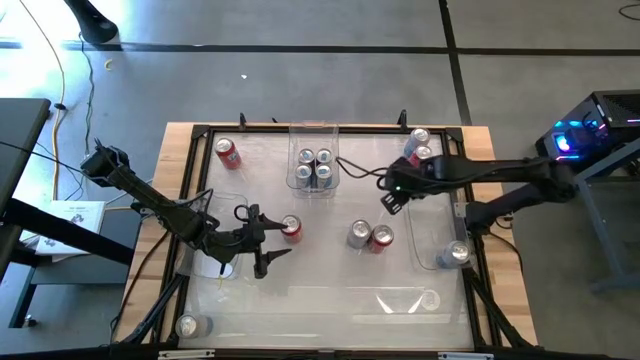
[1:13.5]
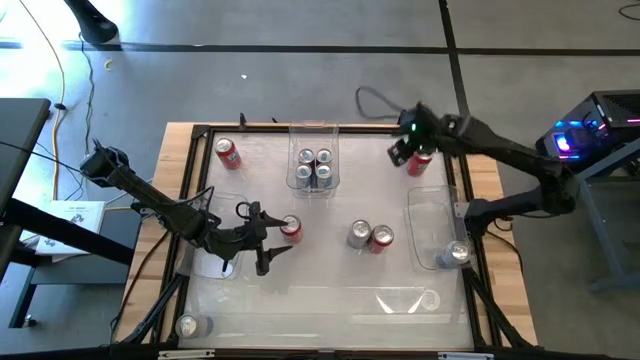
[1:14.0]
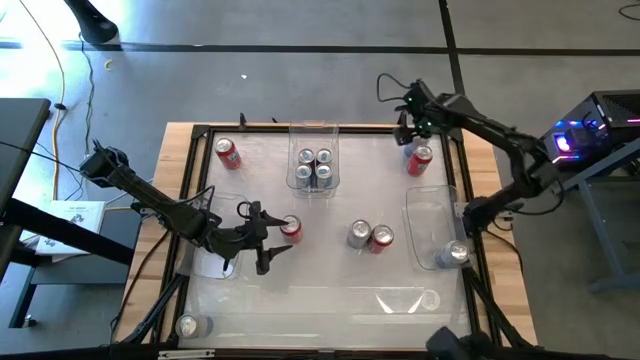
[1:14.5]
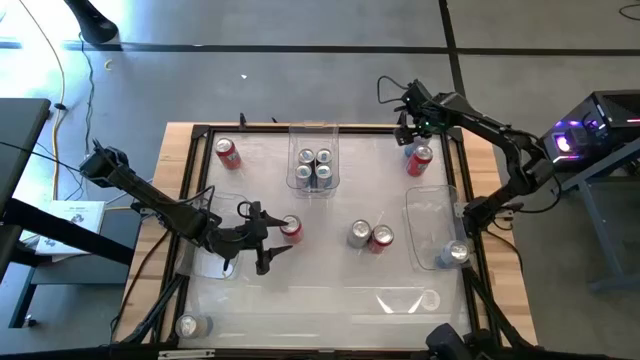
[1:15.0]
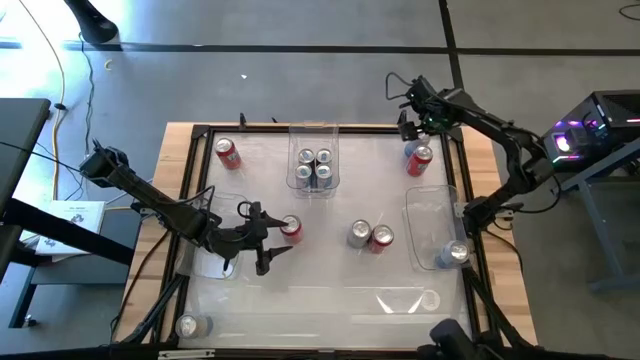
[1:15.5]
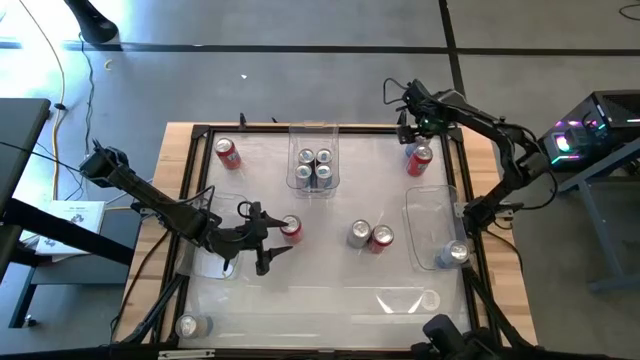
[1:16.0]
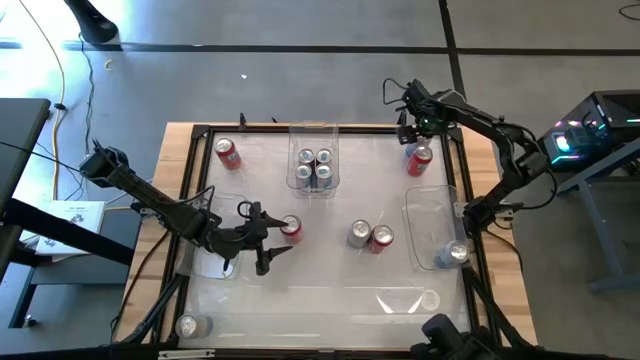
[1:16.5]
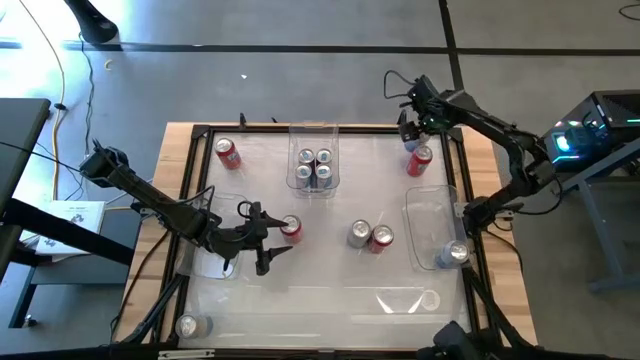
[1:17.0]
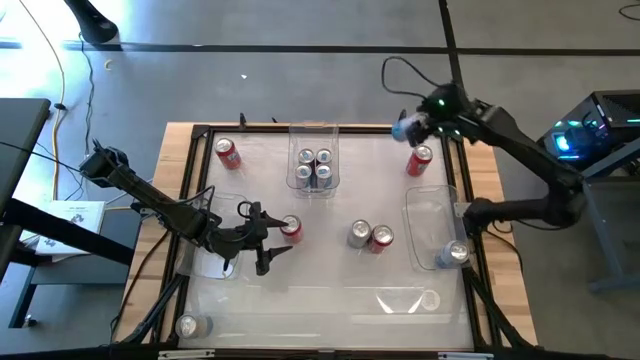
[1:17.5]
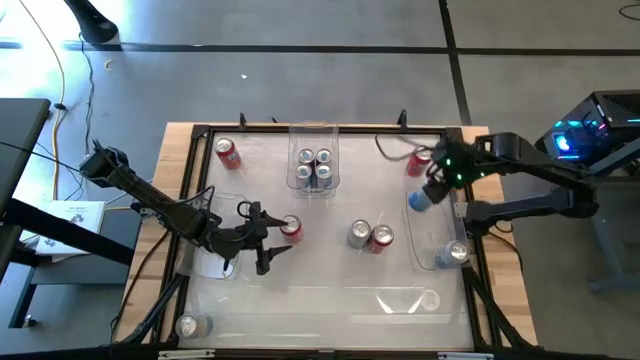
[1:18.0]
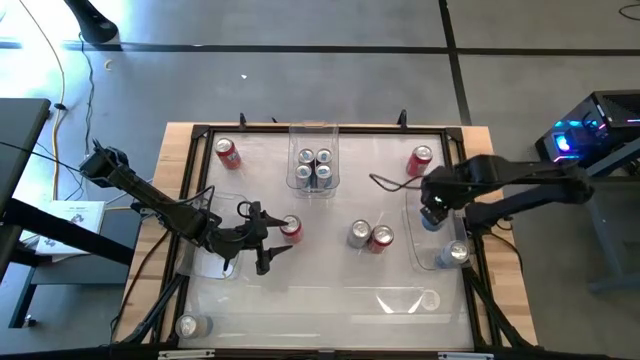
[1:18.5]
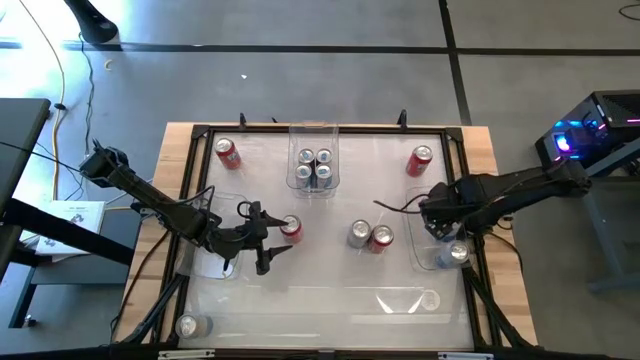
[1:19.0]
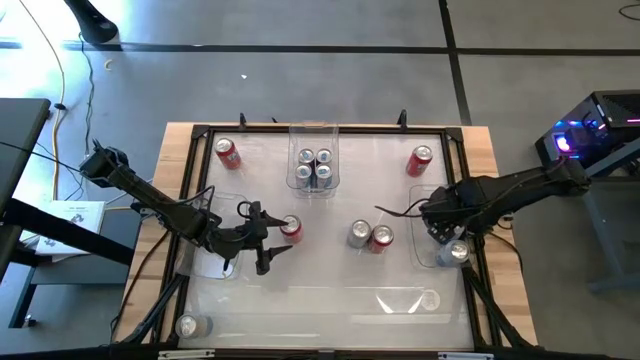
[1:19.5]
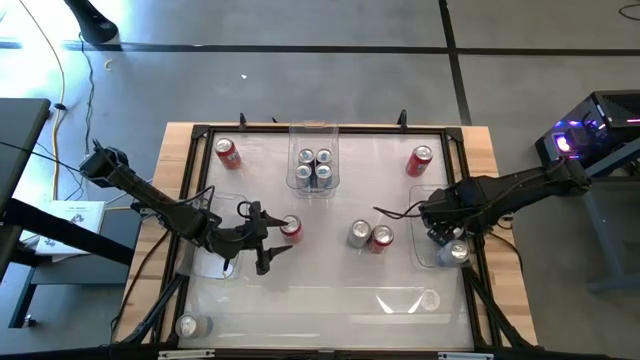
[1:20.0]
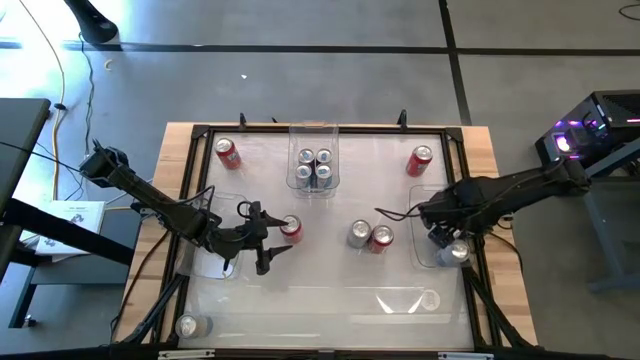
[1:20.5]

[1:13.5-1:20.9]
Task: Sort soda cans
Put the top right blue-white soda can into the bottom right transparent bin

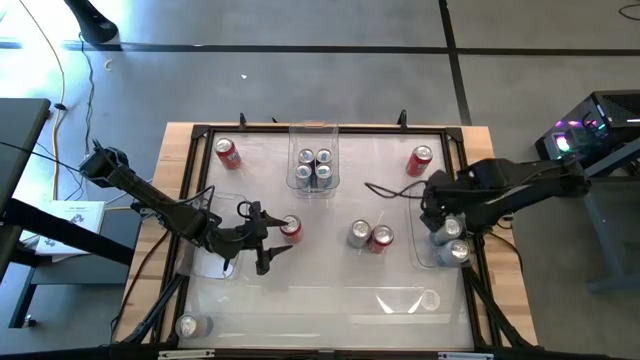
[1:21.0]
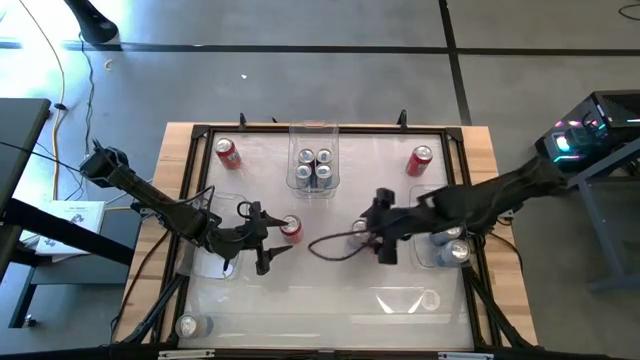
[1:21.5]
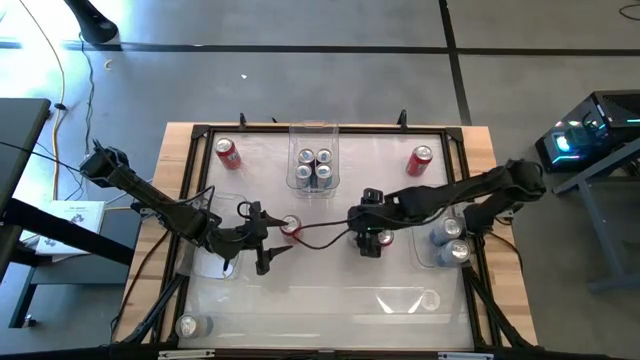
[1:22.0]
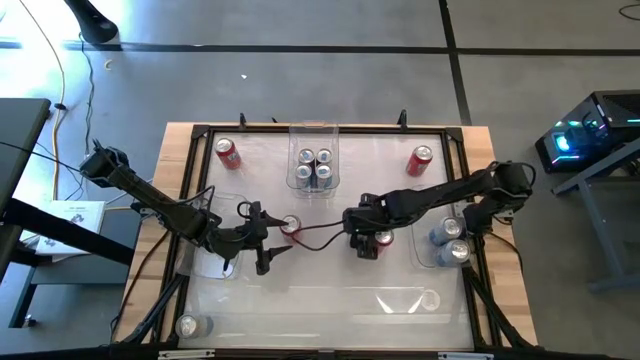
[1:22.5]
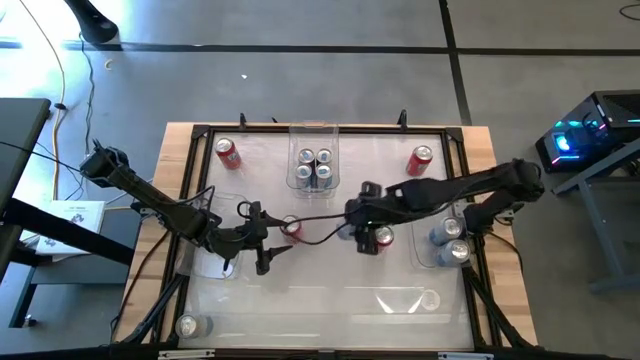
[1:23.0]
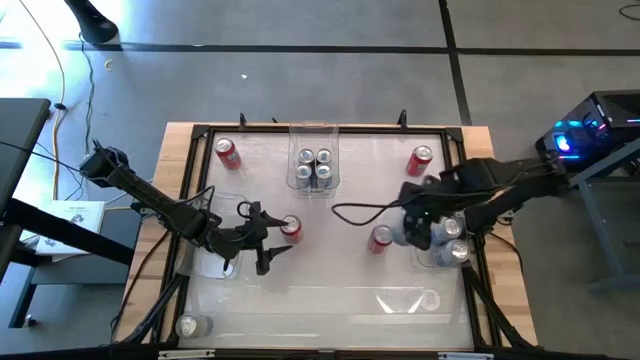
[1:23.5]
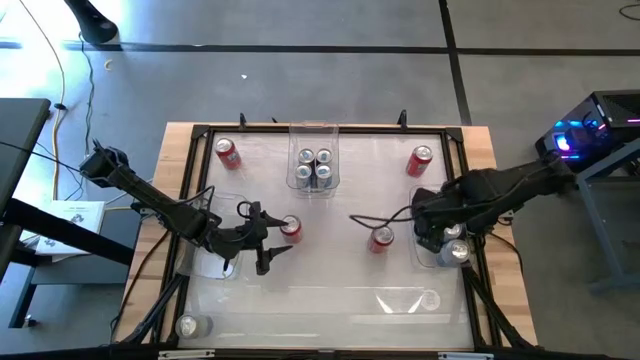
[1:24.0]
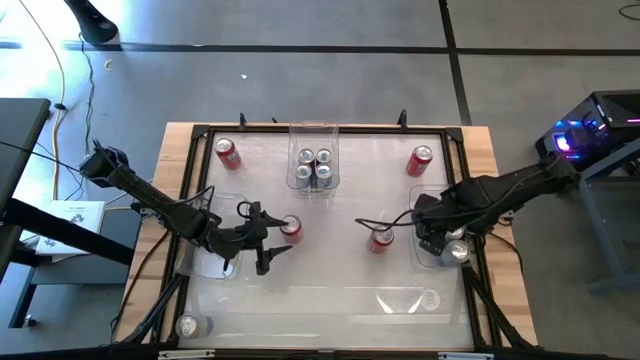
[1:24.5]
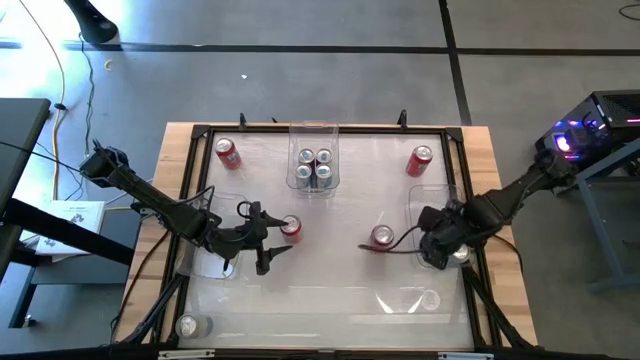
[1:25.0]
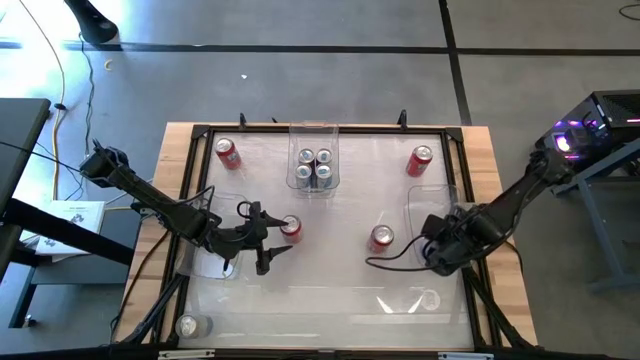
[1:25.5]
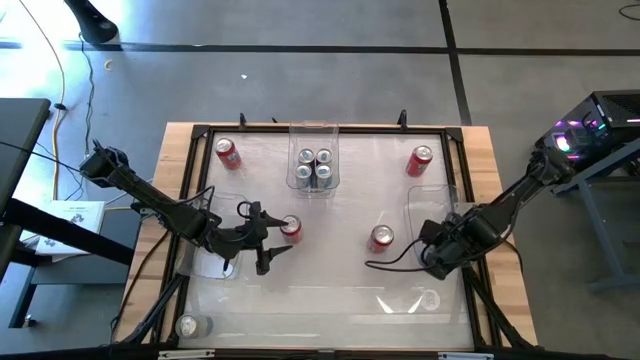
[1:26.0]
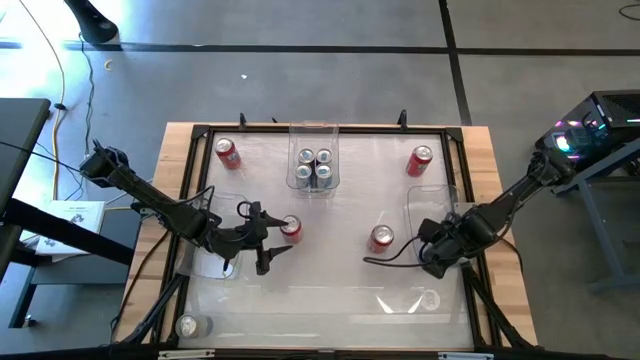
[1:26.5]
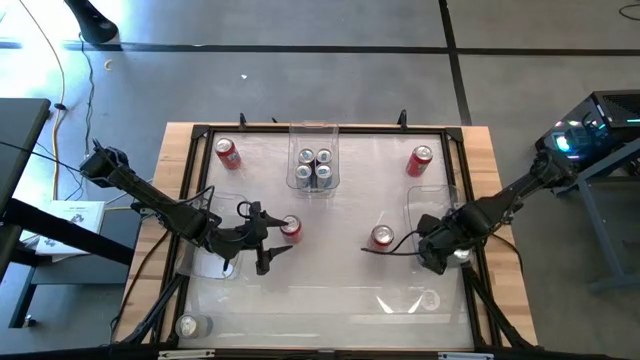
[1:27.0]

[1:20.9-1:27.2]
Put the right blue-white soda can into the bottom right transparent bin

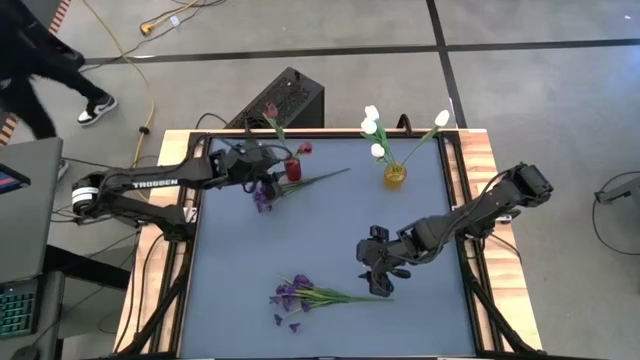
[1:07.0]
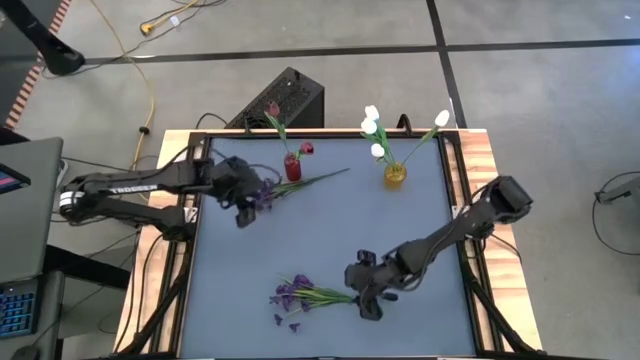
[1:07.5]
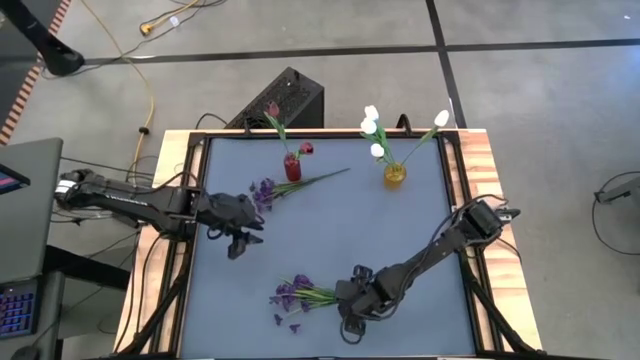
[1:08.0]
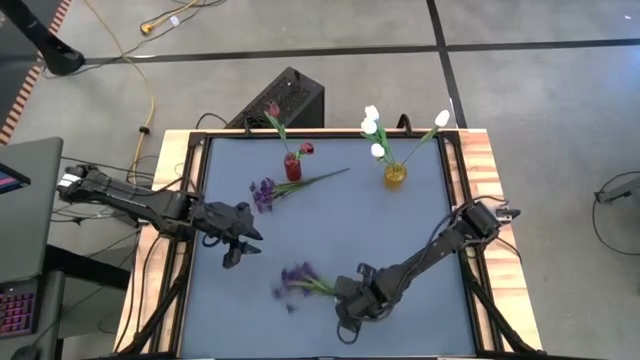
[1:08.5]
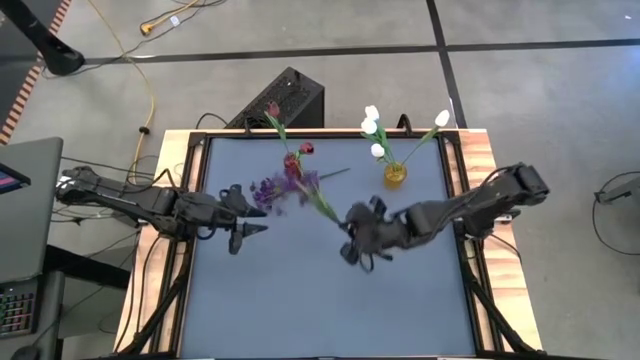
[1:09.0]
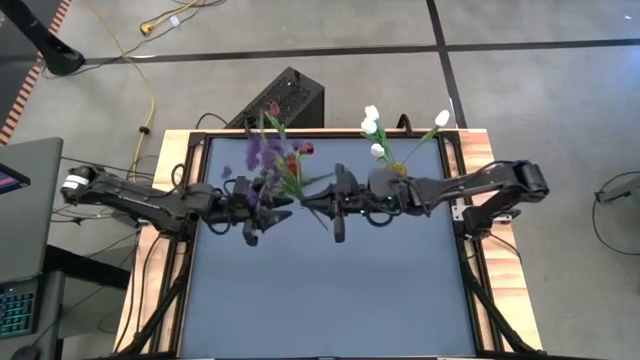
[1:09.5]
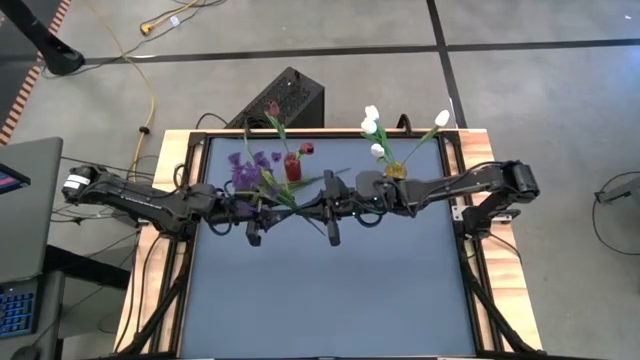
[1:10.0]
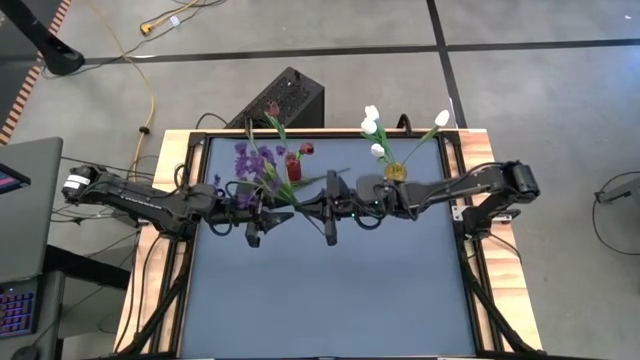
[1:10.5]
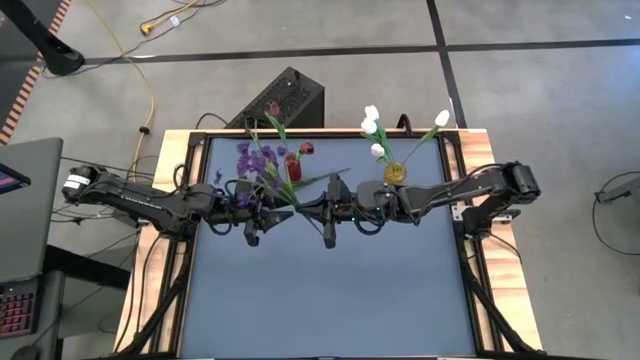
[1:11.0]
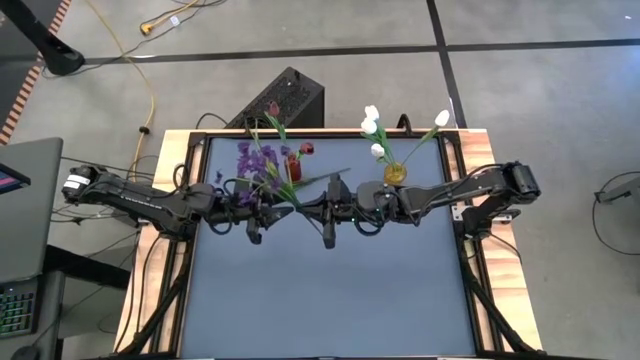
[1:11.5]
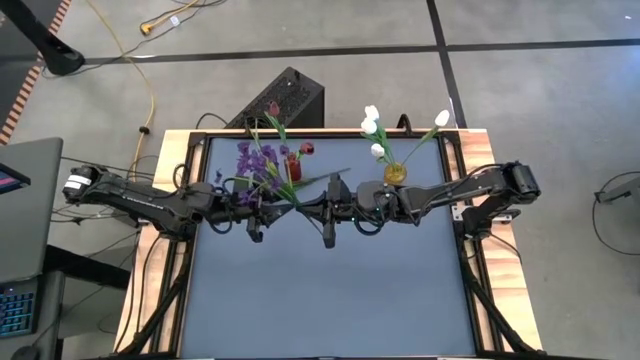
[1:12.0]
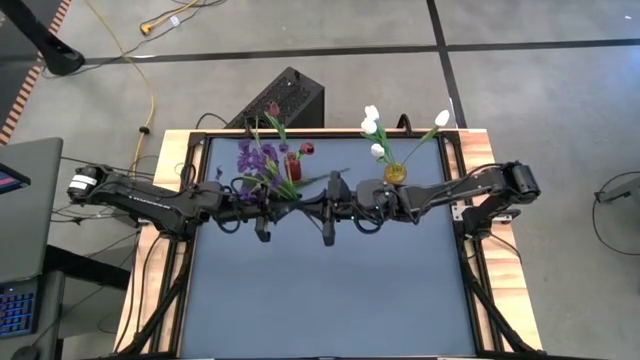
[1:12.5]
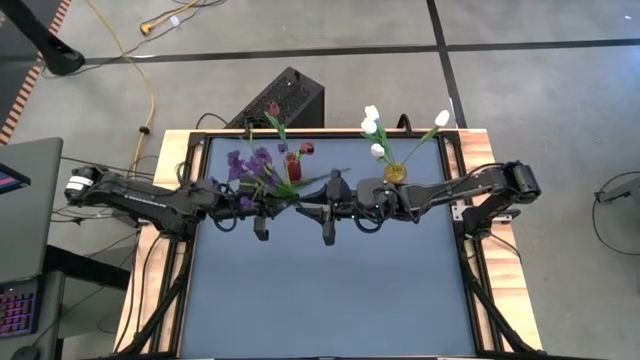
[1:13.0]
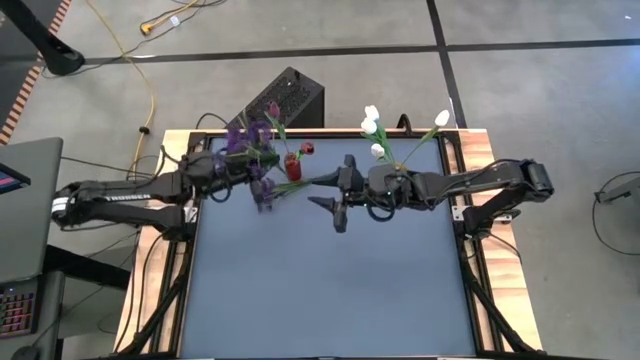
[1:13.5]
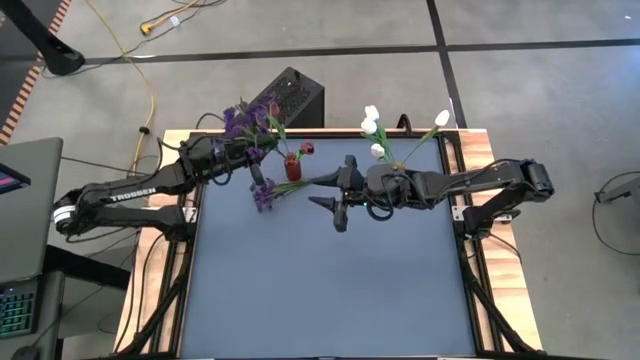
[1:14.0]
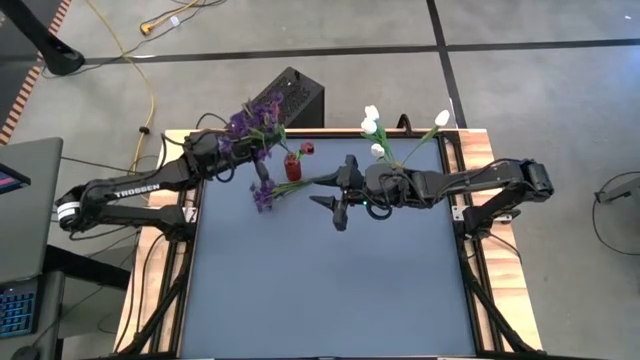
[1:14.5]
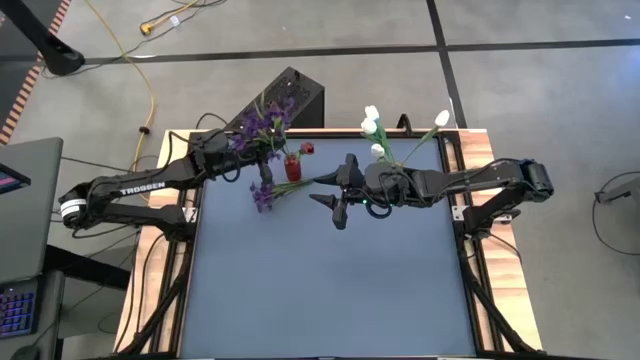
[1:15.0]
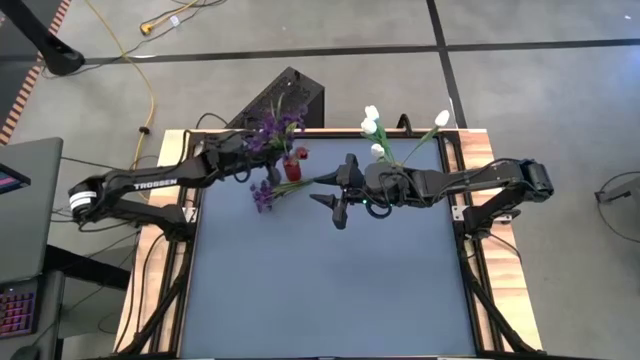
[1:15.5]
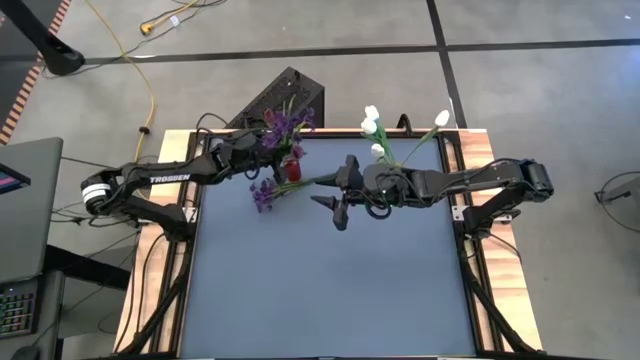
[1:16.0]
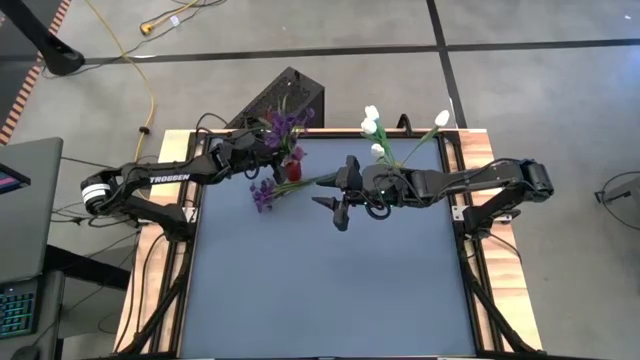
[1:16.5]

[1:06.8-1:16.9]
Task: Sort flowers into vase by color
Put the purple flowers into the red vase
